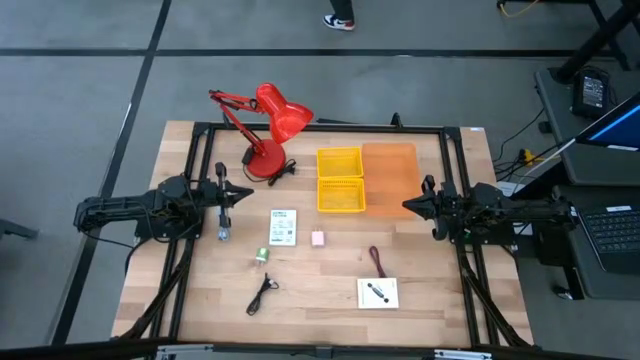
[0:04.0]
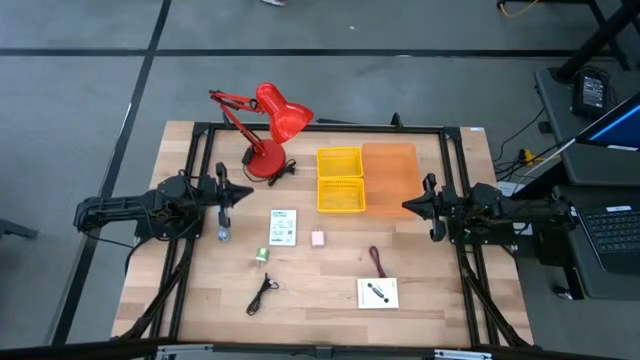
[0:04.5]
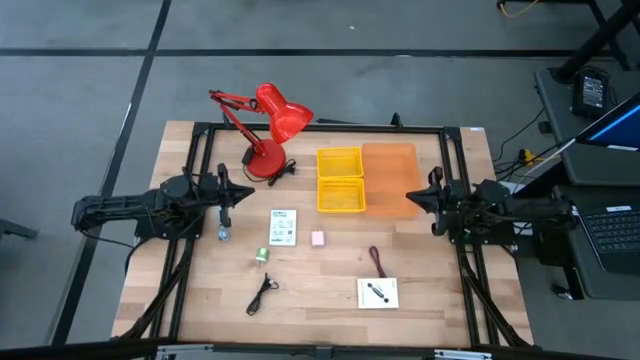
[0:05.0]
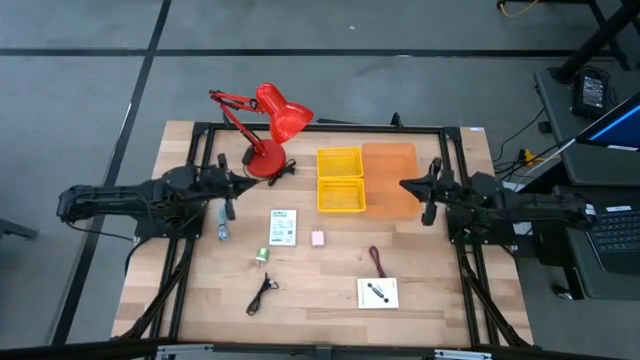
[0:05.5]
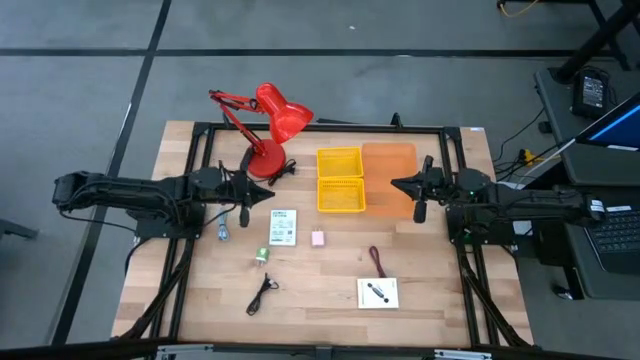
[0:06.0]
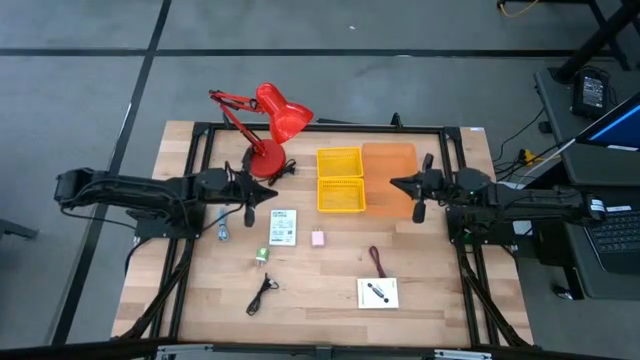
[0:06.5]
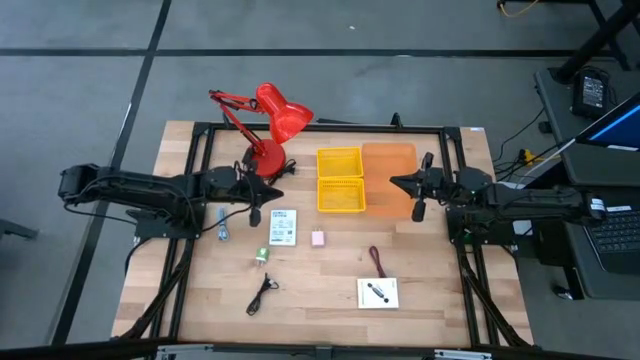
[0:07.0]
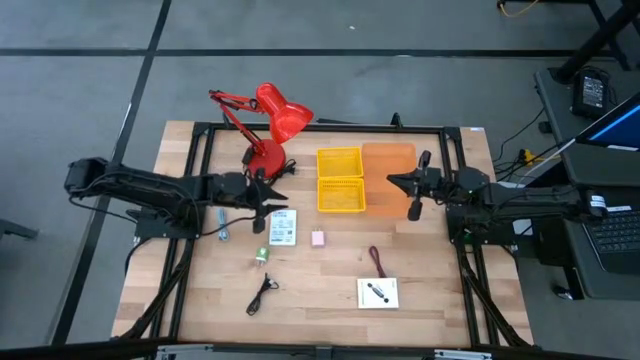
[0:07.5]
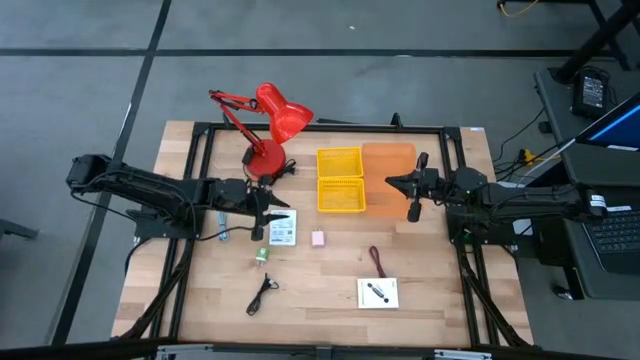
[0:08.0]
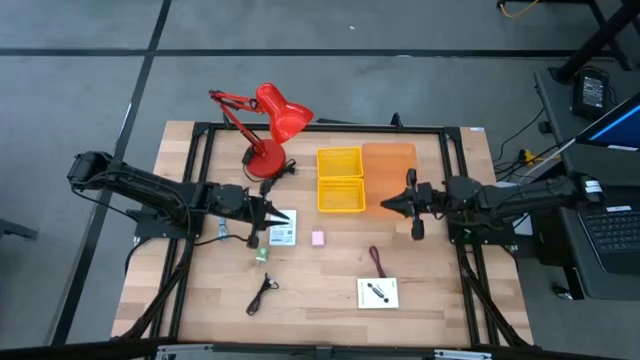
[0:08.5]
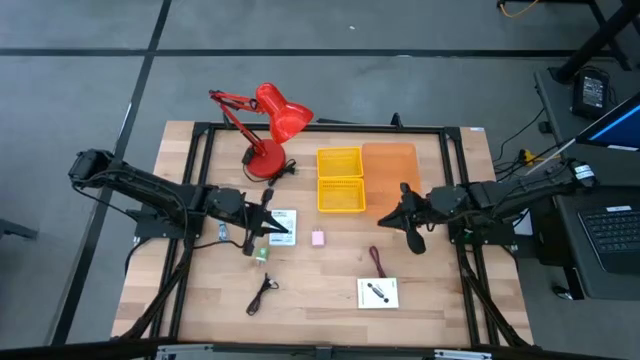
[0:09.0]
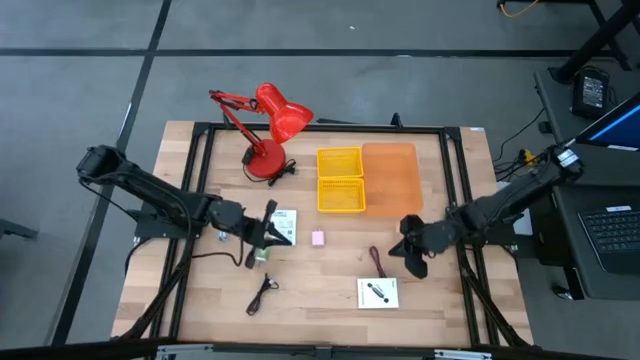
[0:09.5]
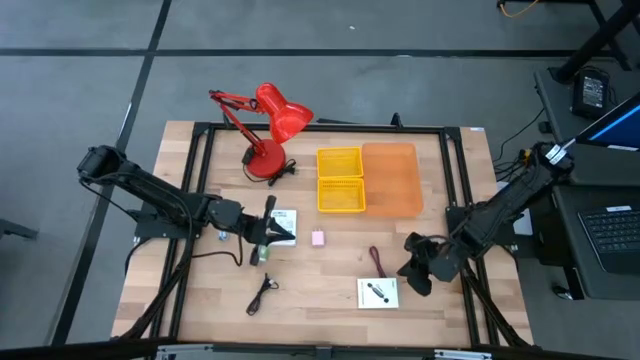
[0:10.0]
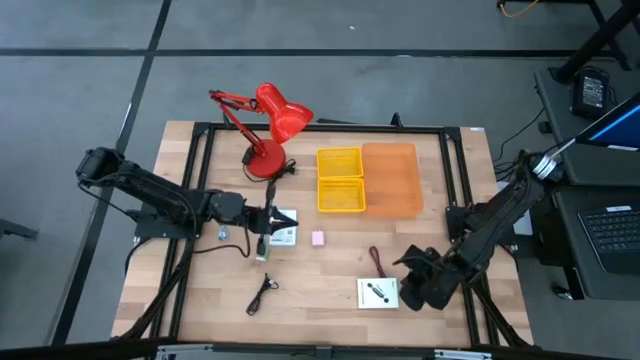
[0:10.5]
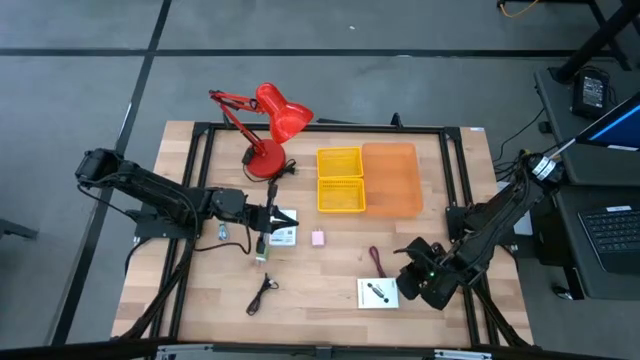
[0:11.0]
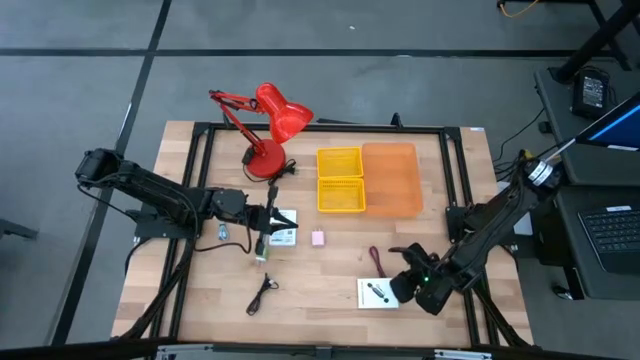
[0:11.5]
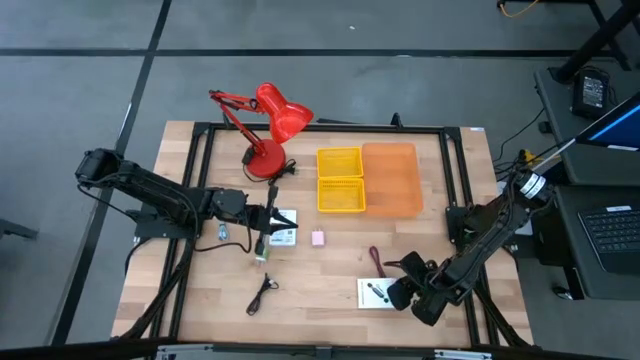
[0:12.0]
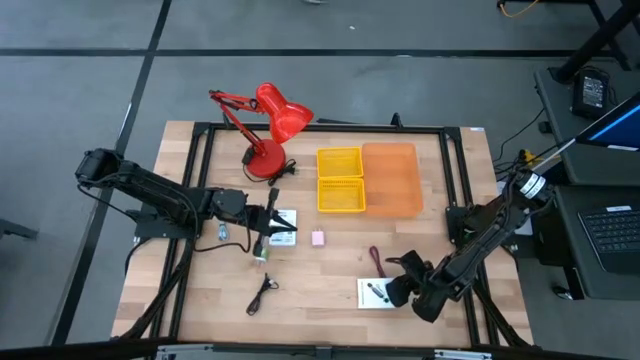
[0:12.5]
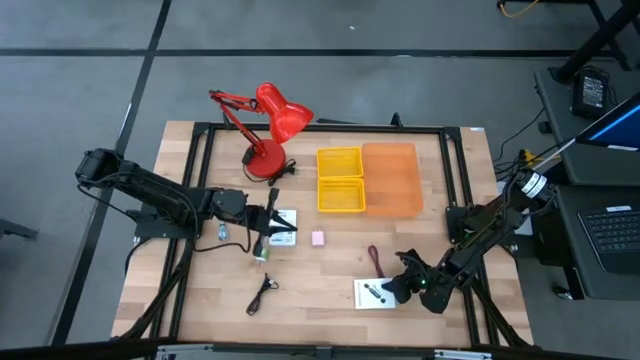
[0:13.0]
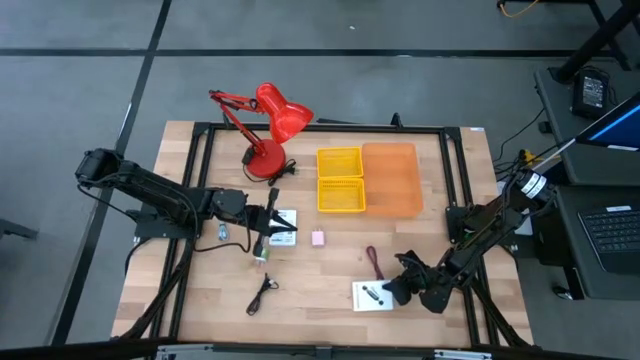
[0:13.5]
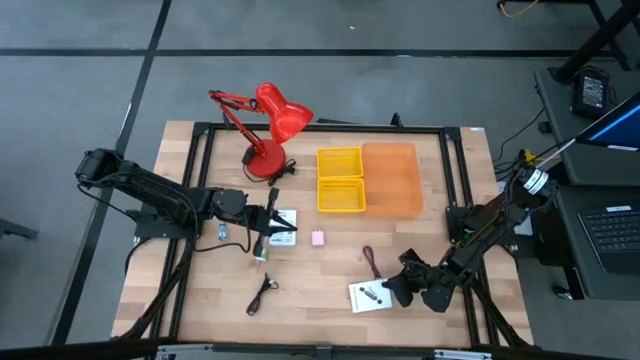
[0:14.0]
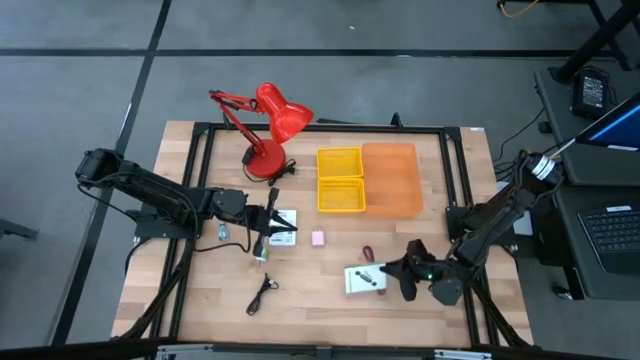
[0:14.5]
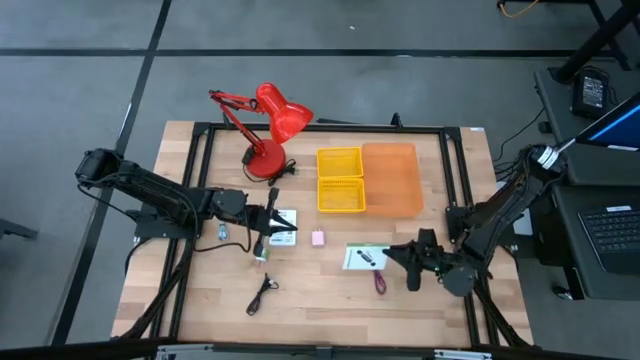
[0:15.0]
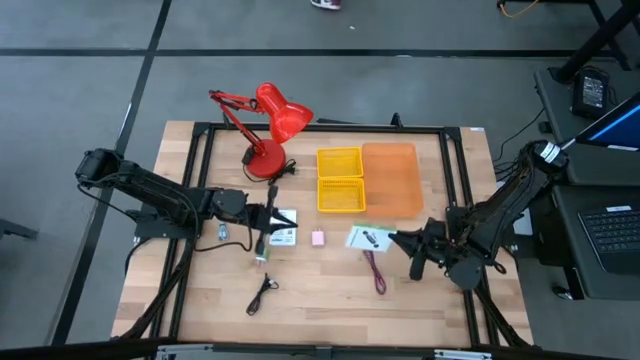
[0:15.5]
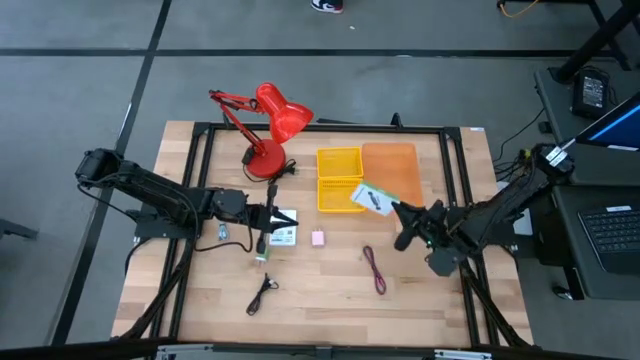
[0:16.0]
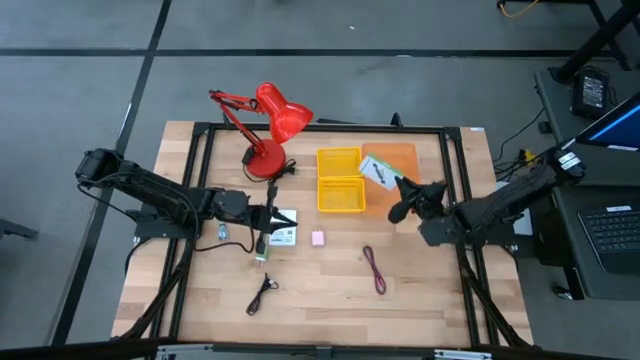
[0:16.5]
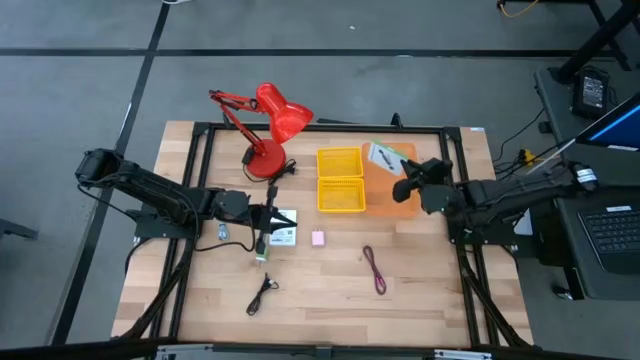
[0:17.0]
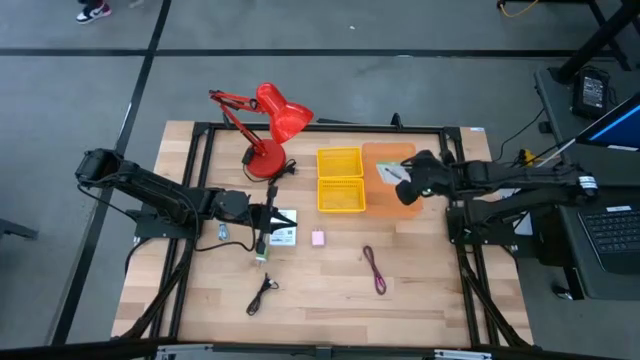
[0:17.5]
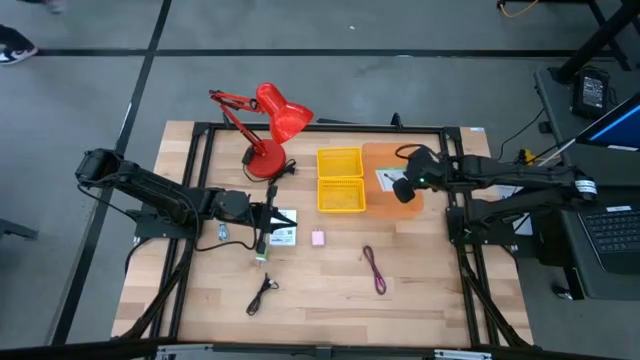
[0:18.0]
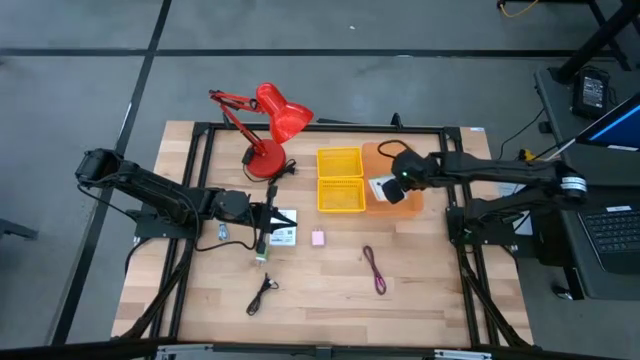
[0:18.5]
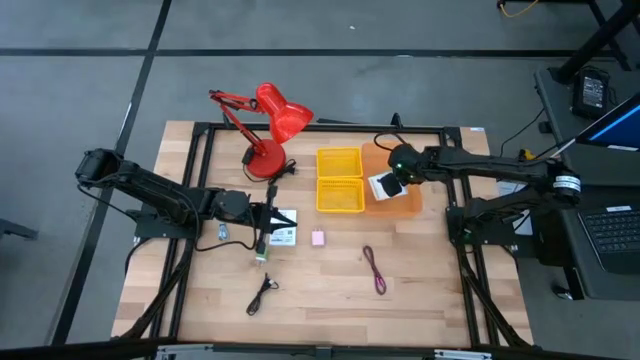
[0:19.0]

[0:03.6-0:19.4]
Task: Pick and place items into bin
Put the right white card reader box into the orange bin

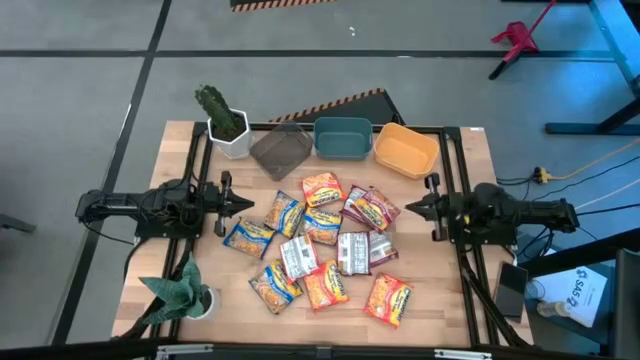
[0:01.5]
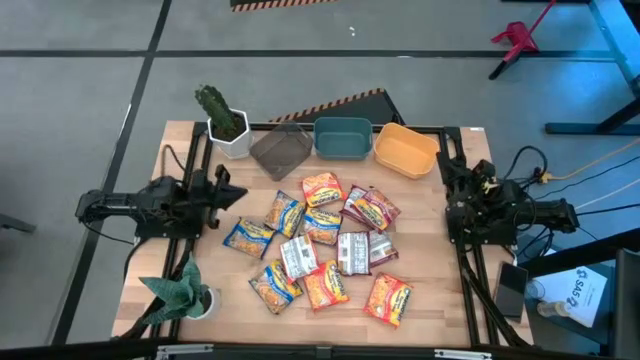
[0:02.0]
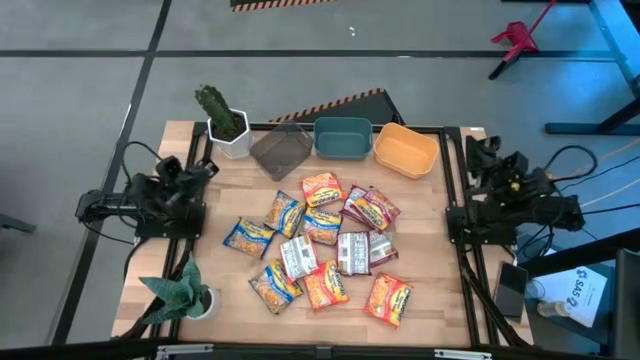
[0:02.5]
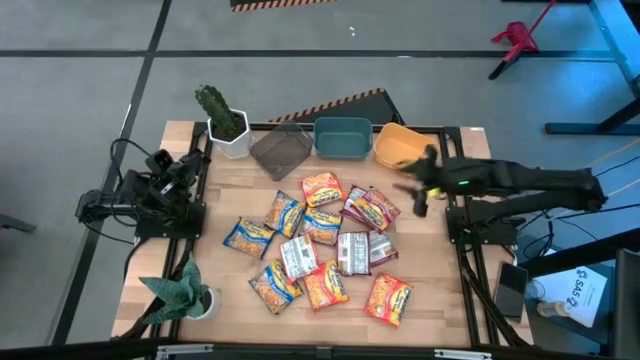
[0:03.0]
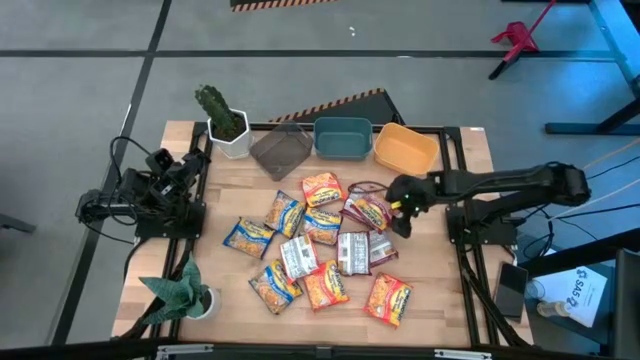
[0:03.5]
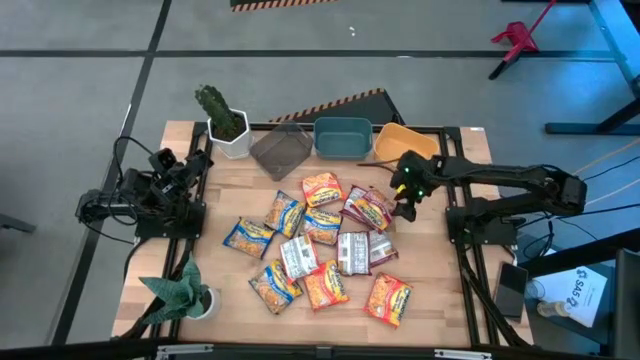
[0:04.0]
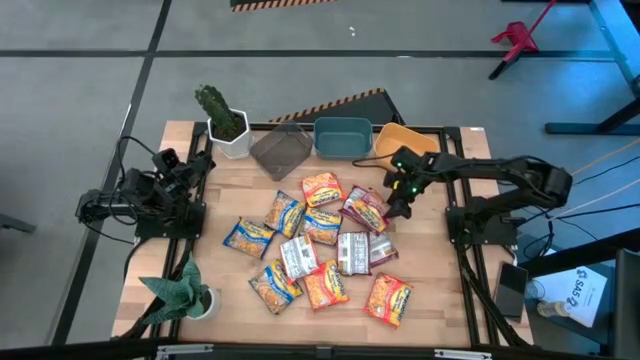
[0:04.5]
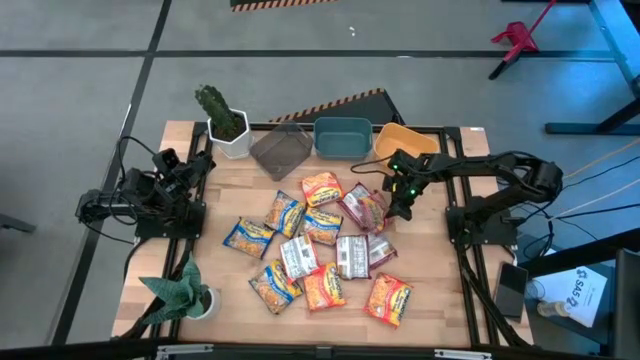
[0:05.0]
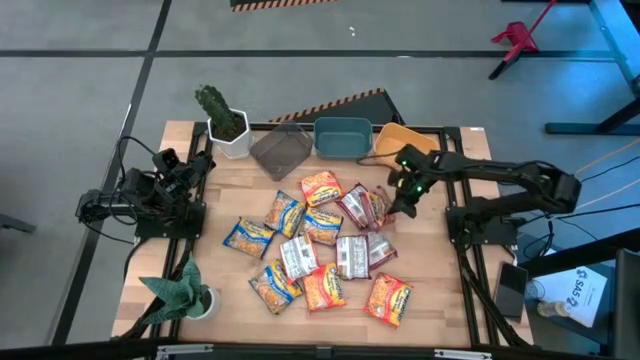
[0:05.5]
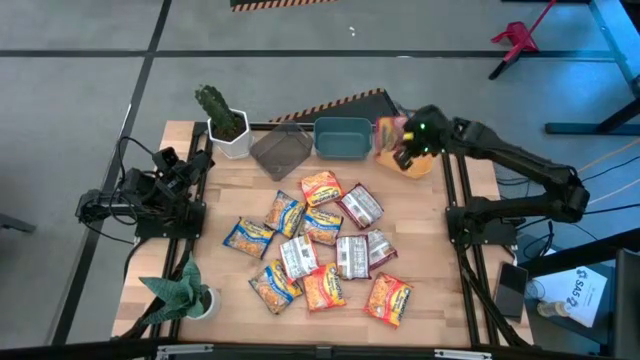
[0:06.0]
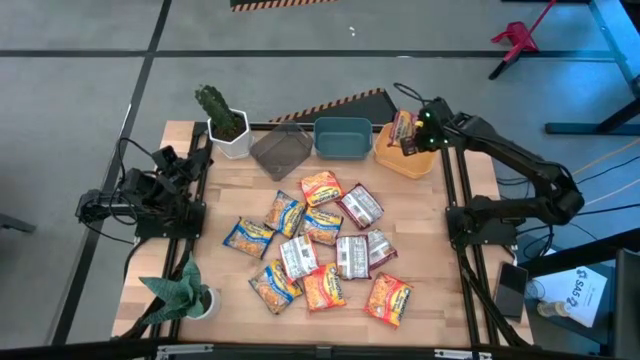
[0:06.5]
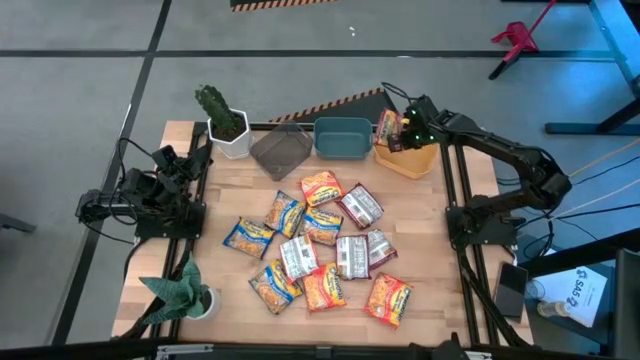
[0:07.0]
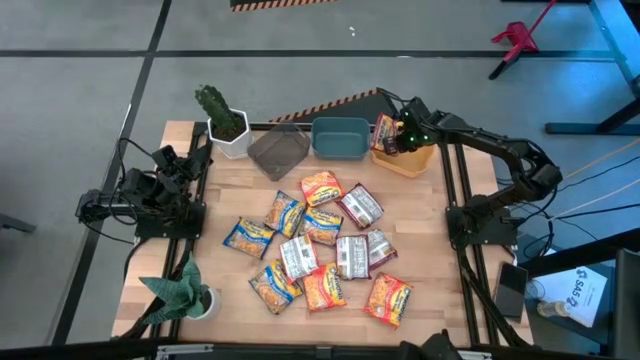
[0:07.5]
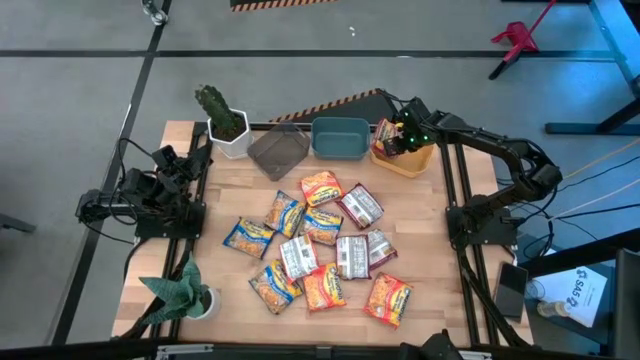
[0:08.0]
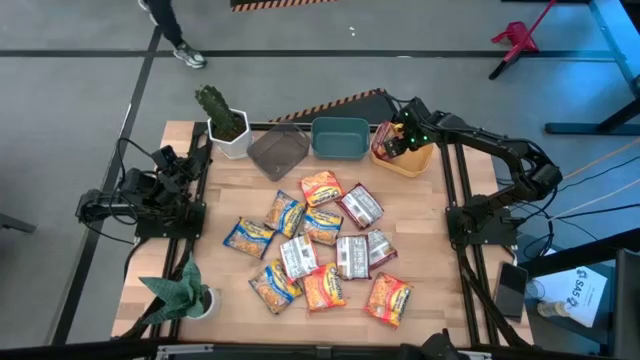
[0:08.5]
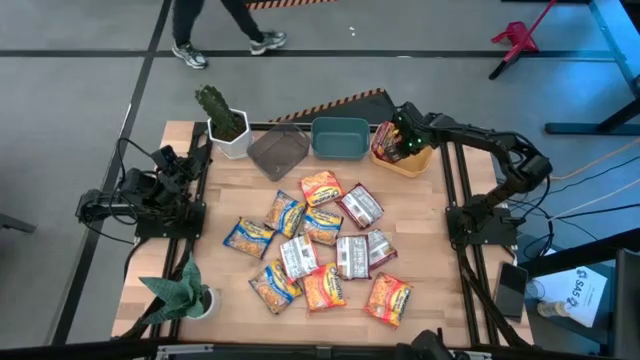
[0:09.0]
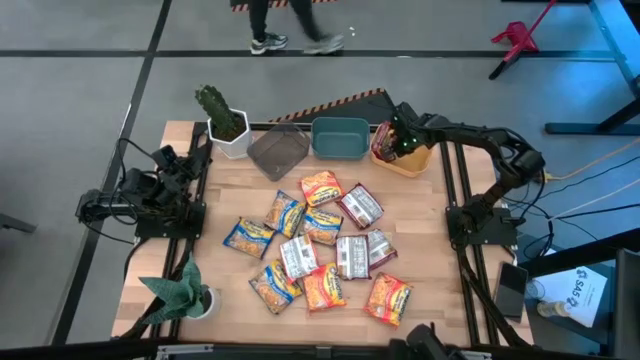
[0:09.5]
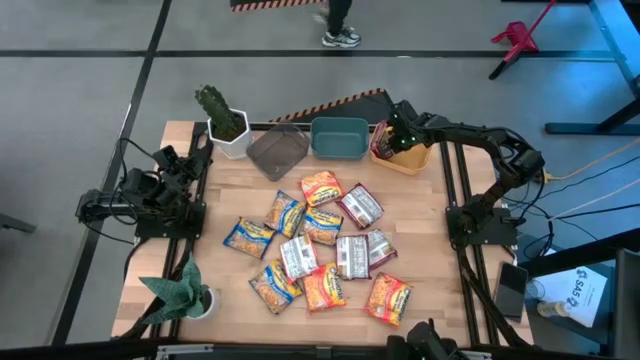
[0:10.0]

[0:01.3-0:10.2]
Task: Sort Maruchan noodles
Put the red noodle pack into the orange bin
